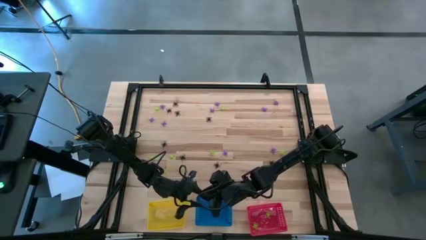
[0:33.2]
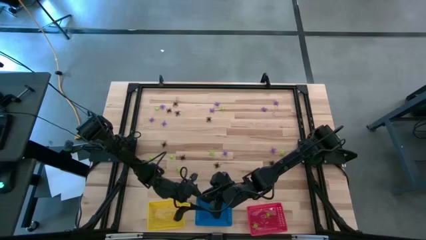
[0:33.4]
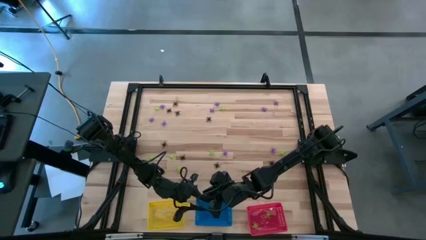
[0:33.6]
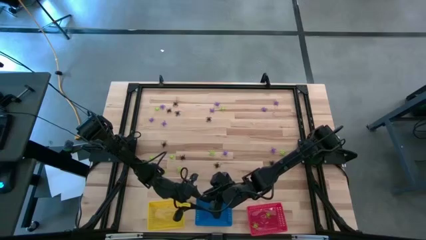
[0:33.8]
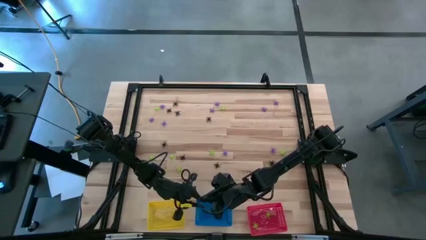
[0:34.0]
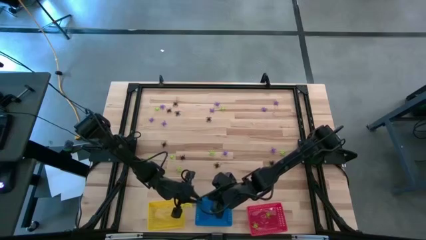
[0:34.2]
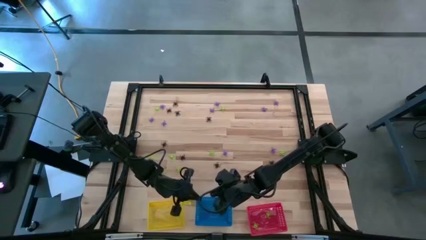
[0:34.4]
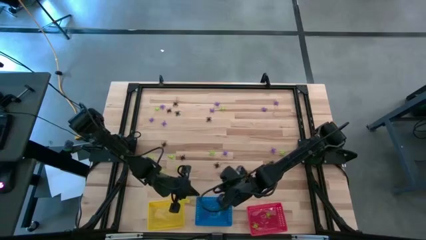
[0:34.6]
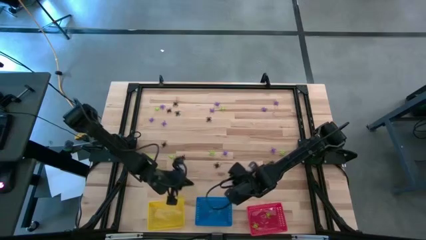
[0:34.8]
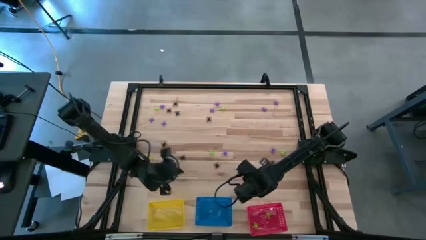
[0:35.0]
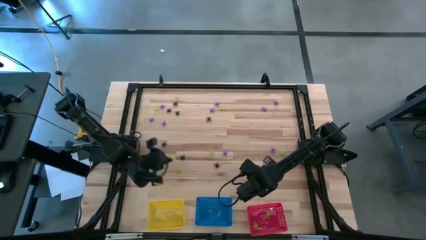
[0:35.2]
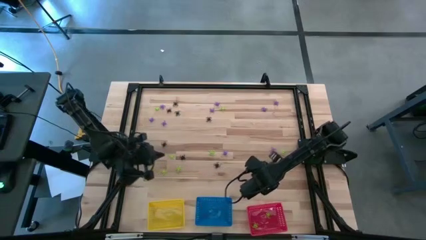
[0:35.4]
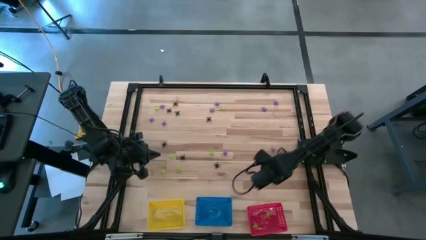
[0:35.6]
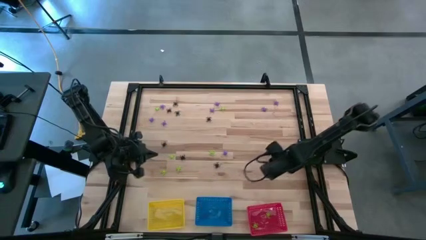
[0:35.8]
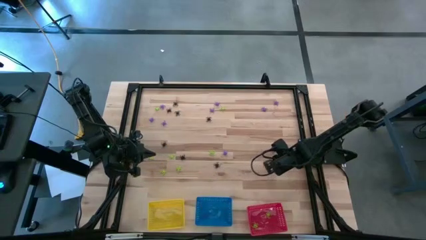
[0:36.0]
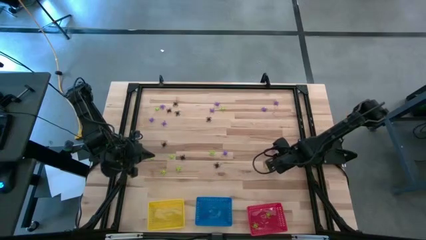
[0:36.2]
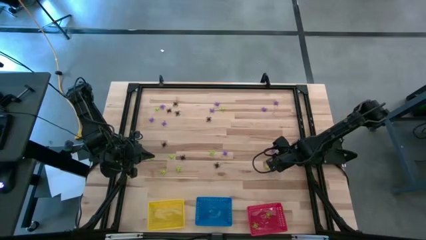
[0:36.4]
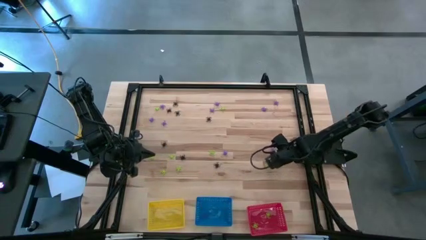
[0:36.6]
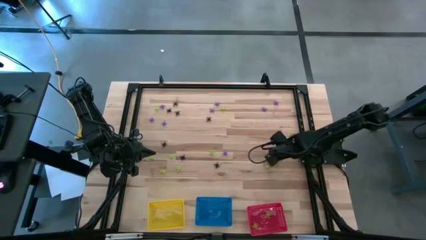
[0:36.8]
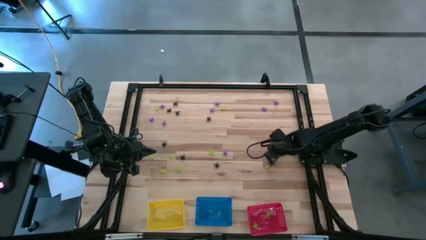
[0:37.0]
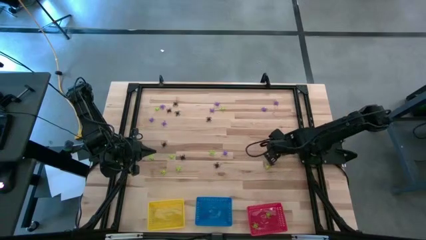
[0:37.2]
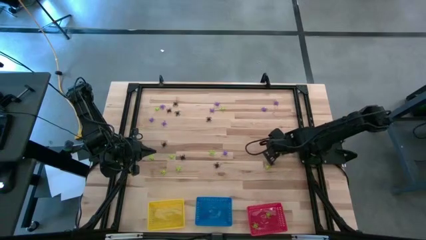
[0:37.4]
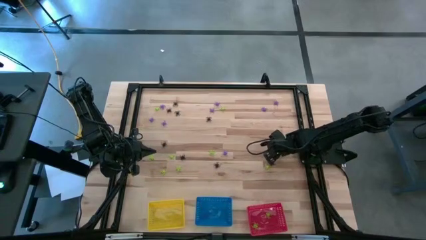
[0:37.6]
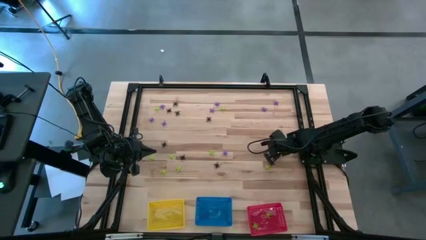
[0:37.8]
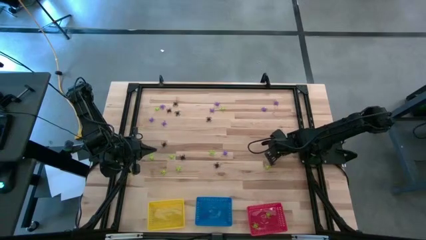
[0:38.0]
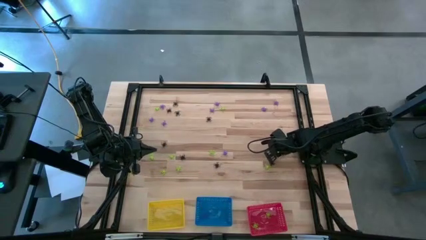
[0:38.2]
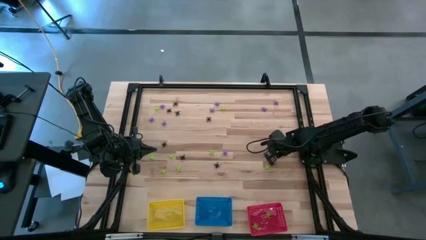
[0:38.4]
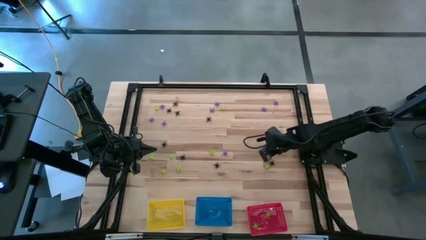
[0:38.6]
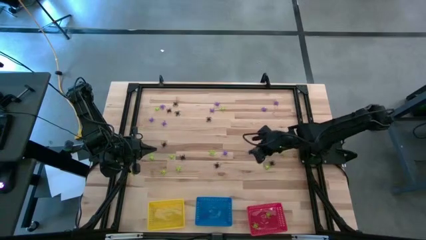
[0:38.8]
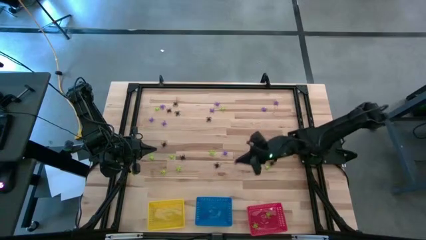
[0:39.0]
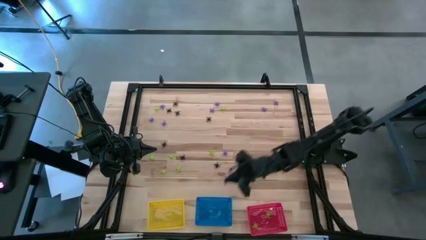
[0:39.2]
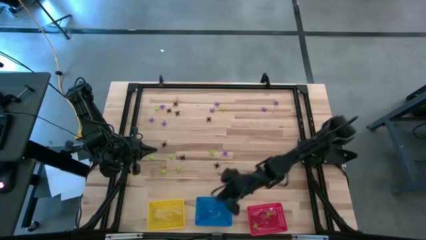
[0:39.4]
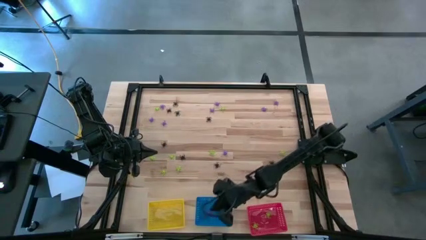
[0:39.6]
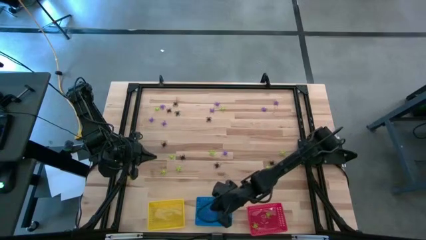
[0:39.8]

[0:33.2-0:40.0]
Task: Sort Halloween decoration
Put the violet spider toy into the blue bin

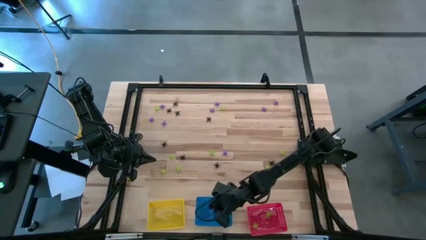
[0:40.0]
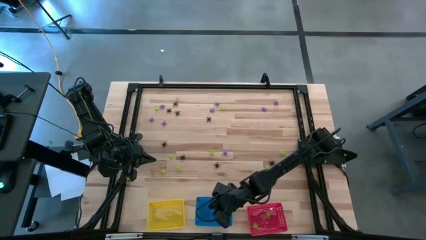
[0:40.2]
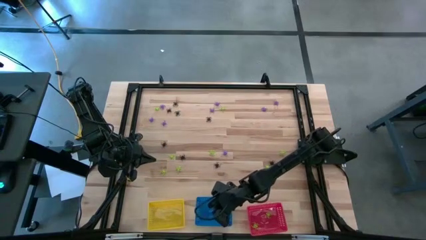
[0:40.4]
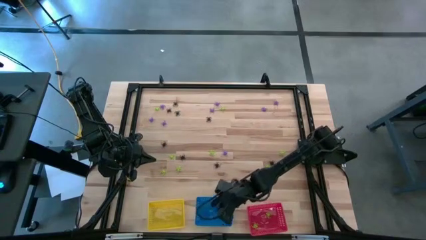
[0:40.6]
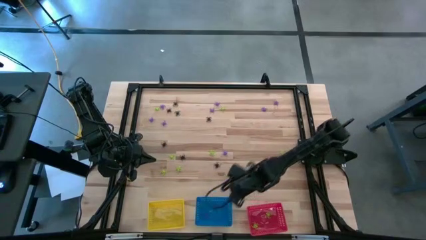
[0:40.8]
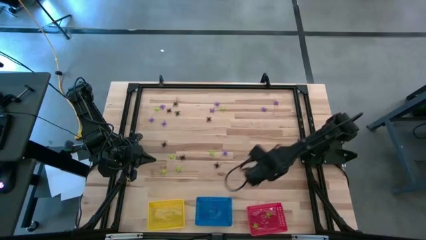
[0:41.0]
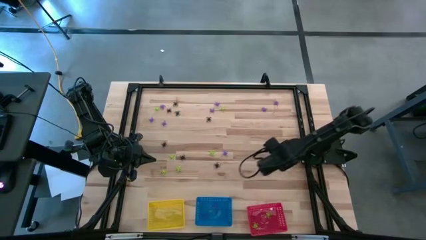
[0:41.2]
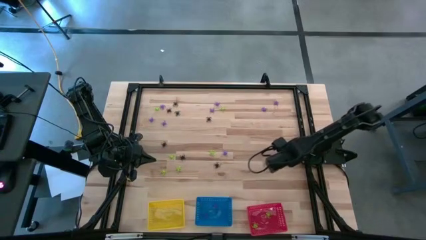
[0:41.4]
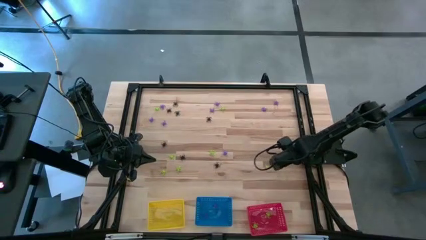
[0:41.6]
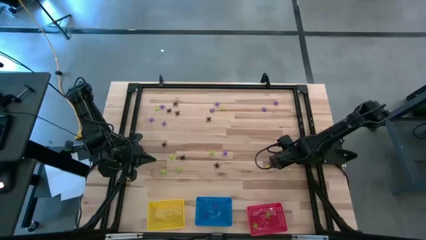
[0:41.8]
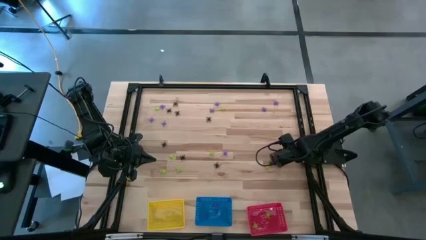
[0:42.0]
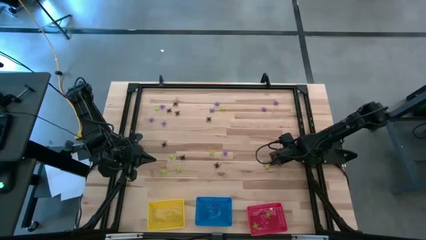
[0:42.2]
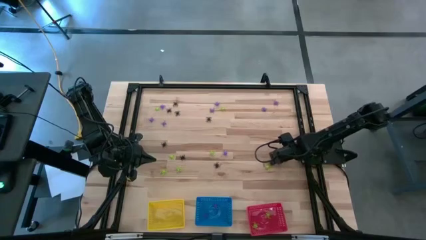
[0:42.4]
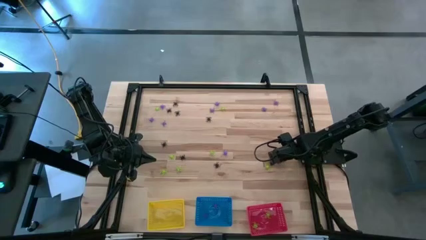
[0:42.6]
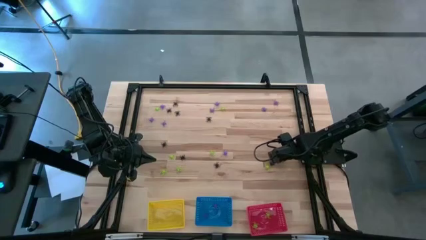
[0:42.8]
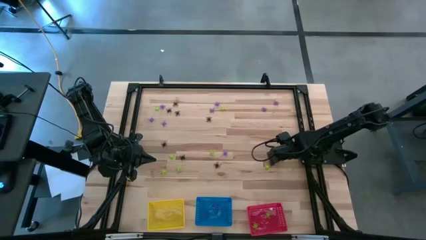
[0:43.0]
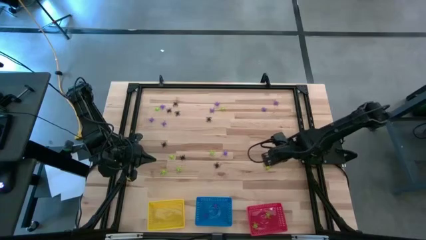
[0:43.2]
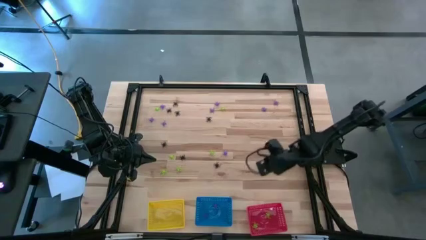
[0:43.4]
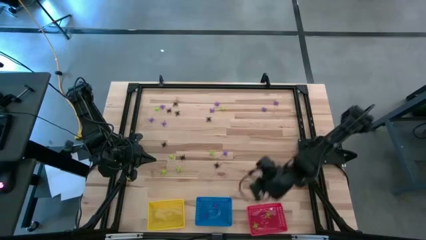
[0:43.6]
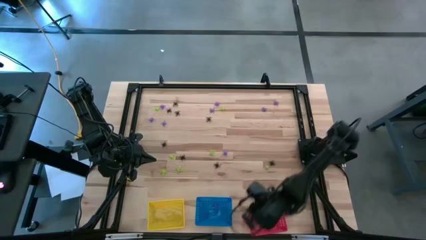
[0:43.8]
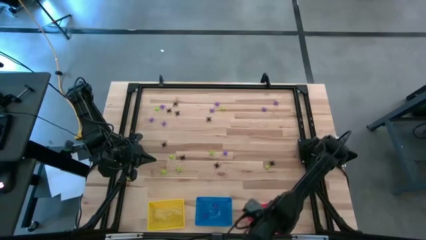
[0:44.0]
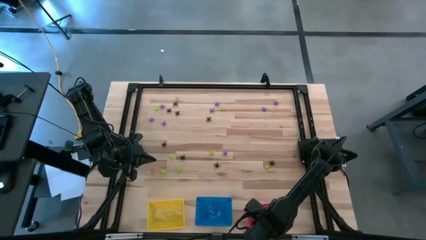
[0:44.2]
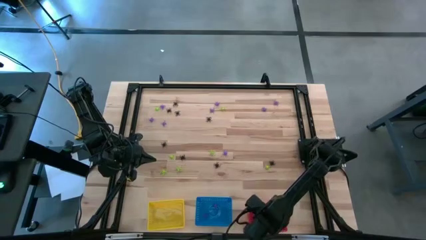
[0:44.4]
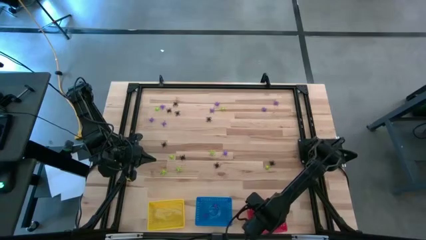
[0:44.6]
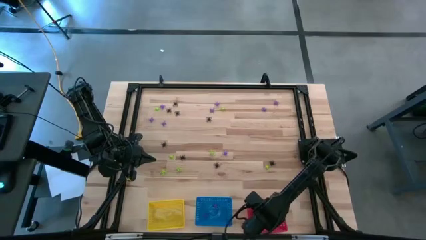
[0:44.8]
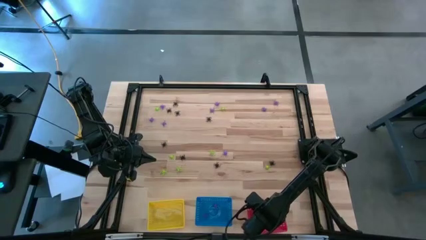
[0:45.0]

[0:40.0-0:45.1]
Put the green spider toy into the red bin

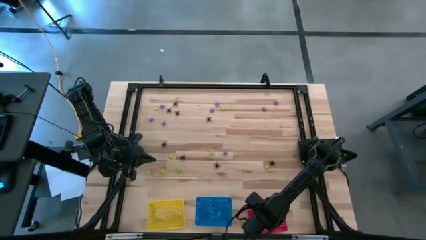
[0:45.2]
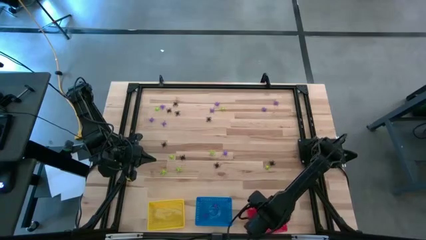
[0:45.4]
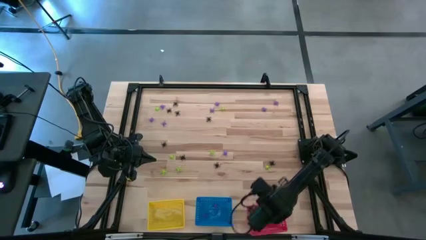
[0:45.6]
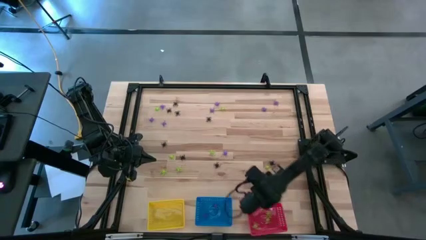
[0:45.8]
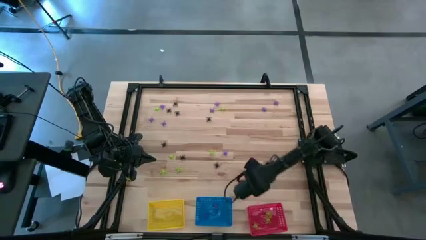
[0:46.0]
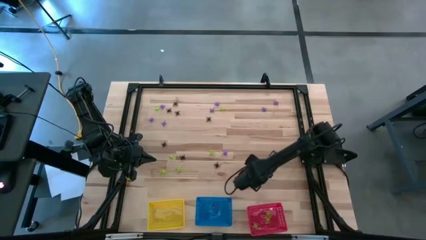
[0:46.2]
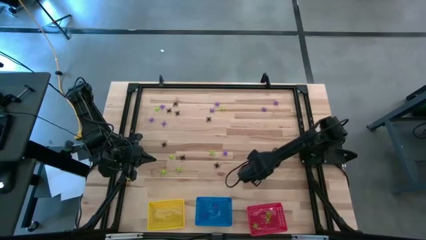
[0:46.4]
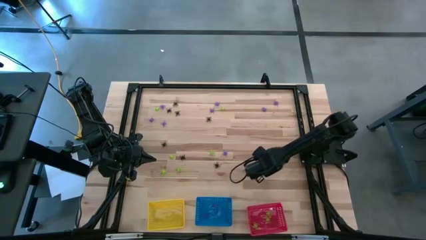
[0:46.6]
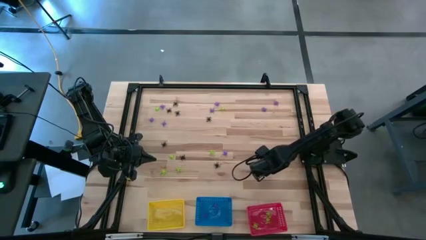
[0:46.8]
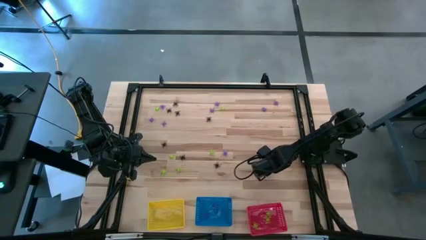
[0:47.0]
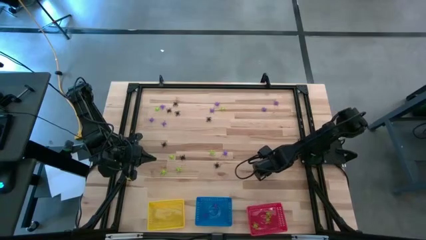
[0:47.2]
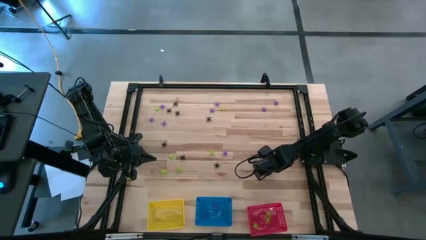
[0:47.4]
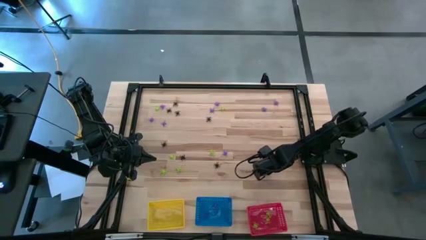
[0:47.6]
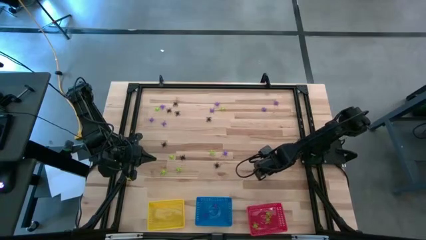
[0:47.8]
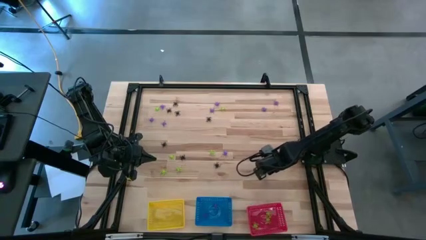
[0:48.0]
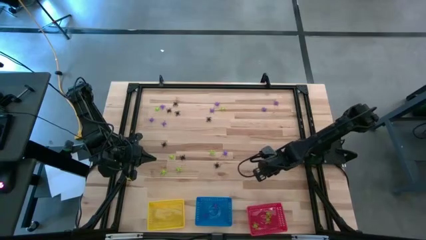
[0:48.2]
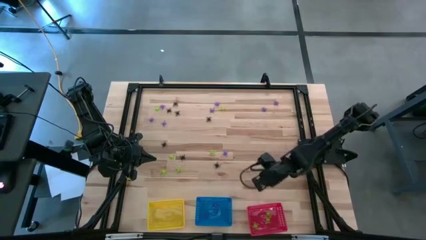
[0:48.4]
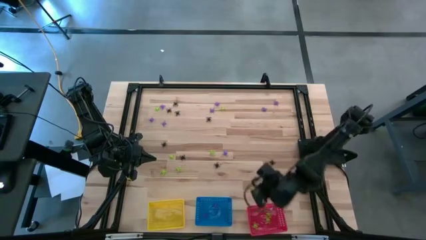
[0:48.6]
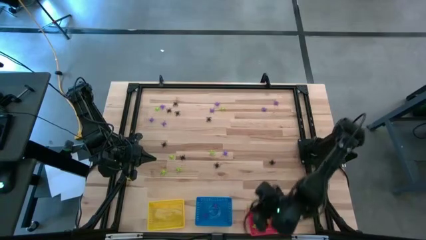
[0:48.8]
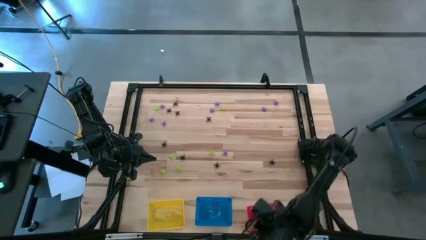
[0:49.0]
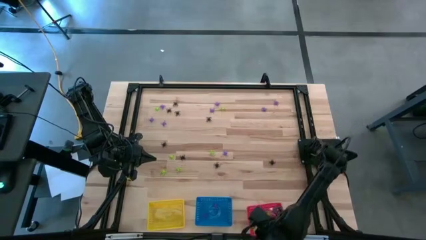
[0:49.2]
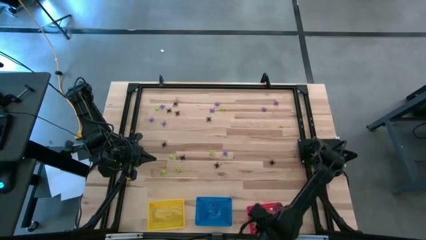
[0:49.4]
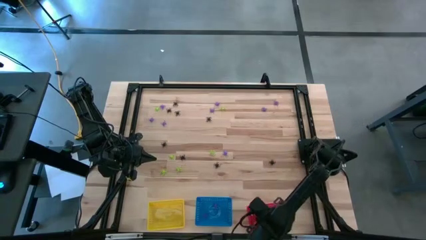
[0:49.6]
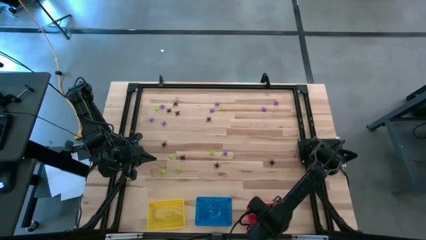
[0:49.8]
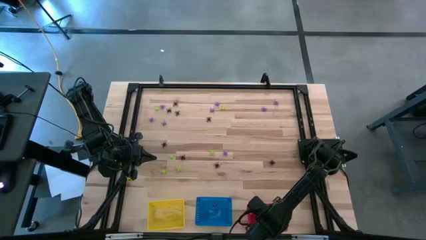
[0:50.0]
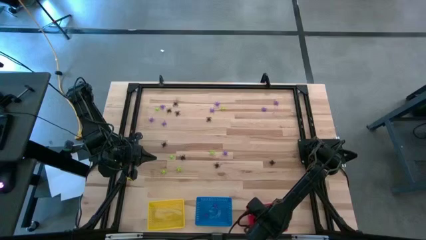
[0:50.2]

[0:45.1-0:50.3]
Put the green spider toy into the red bin
